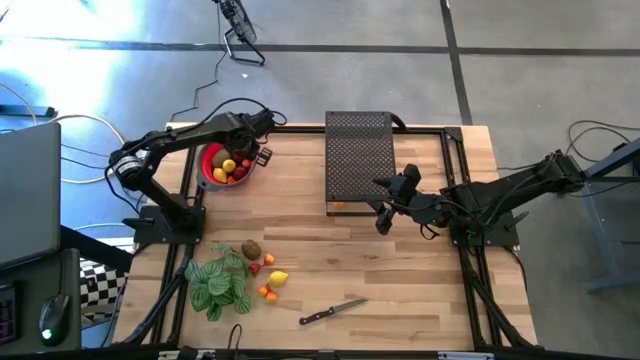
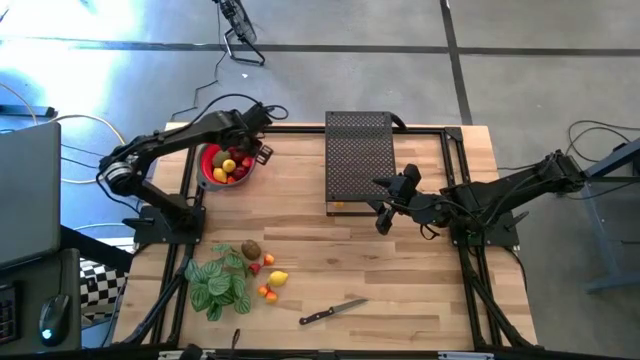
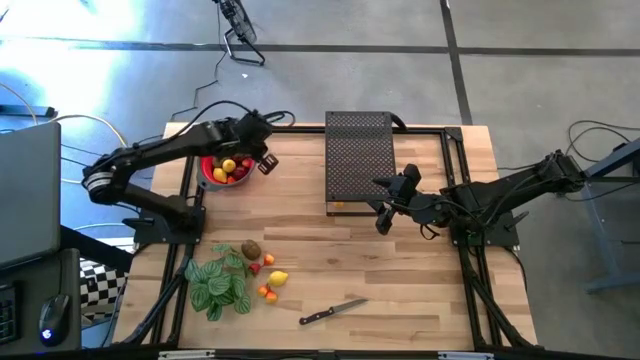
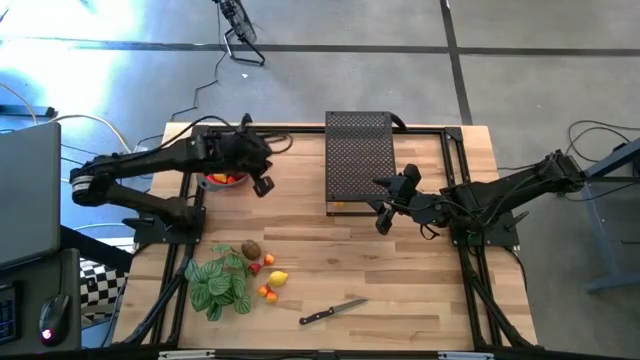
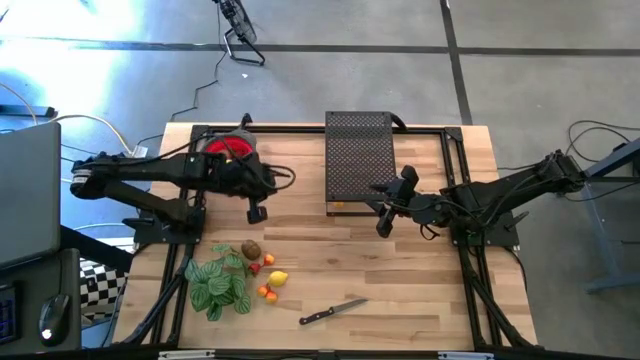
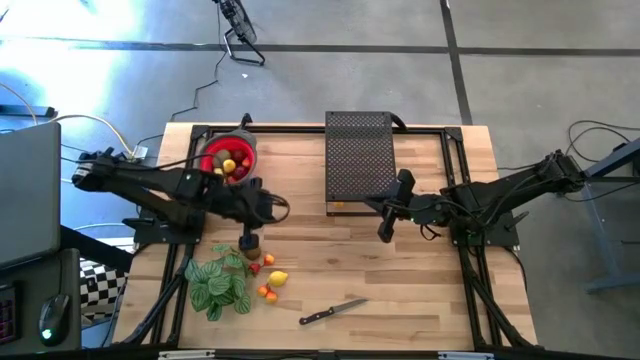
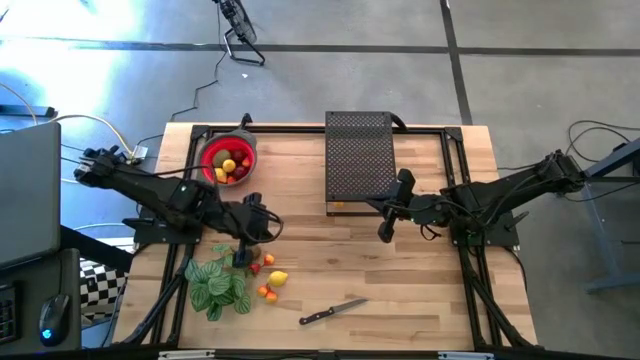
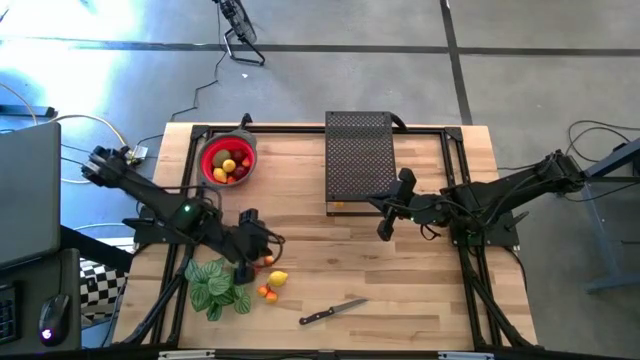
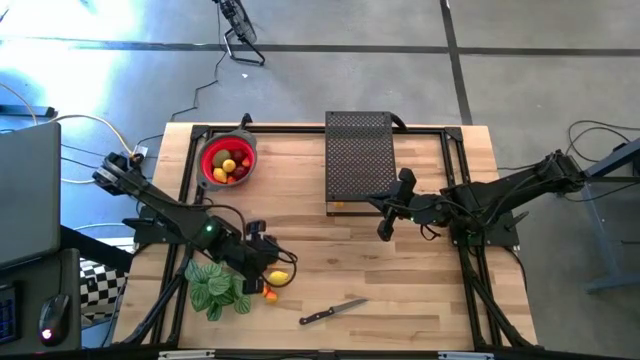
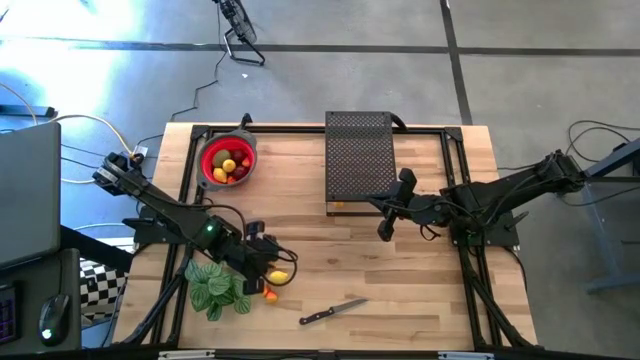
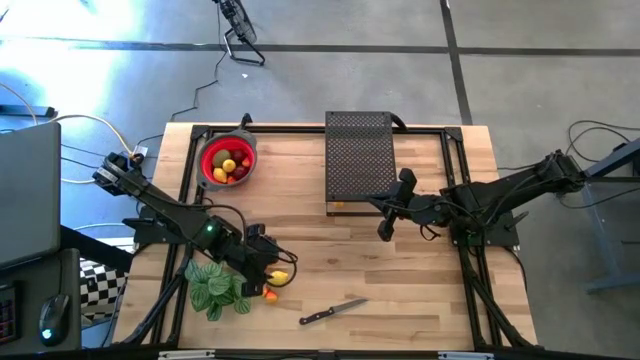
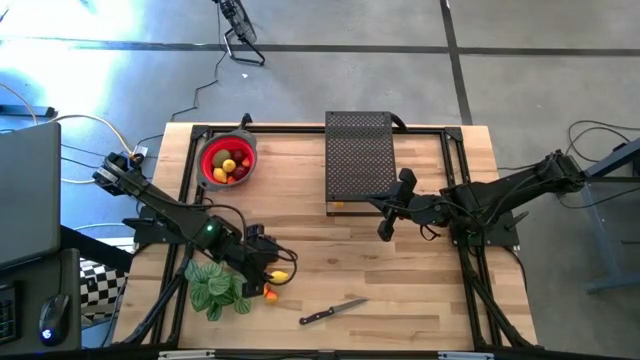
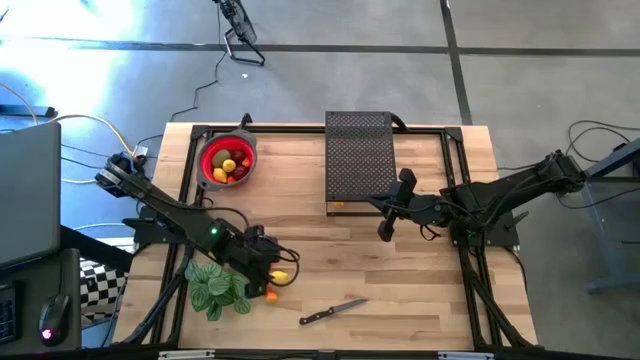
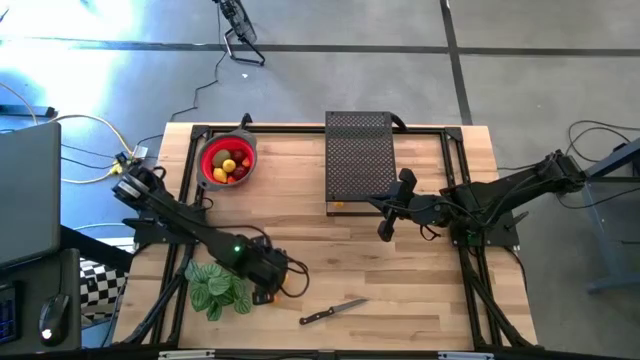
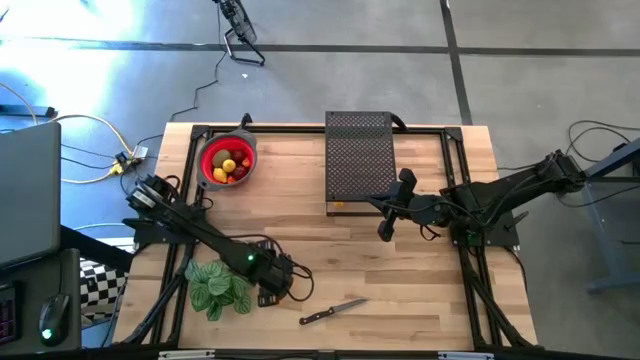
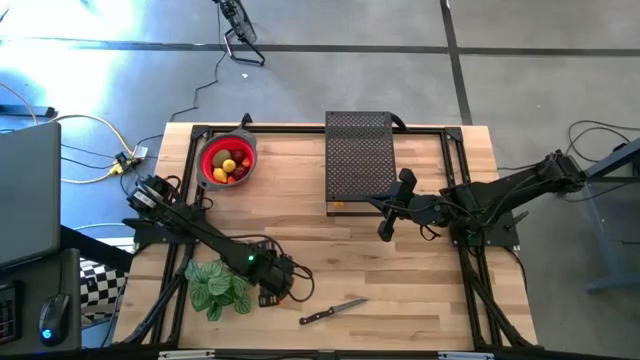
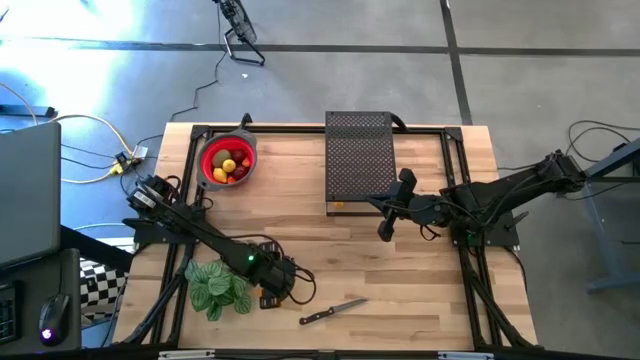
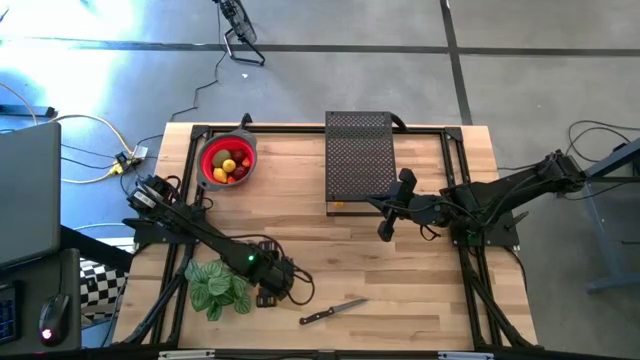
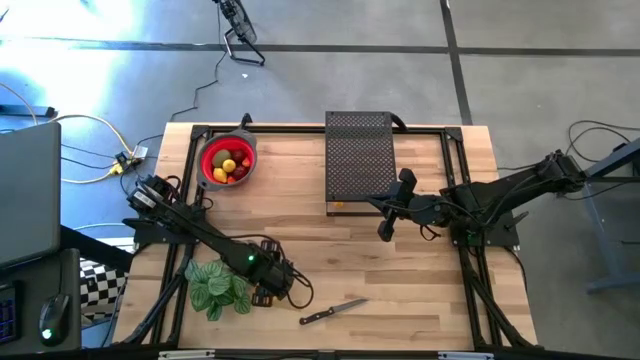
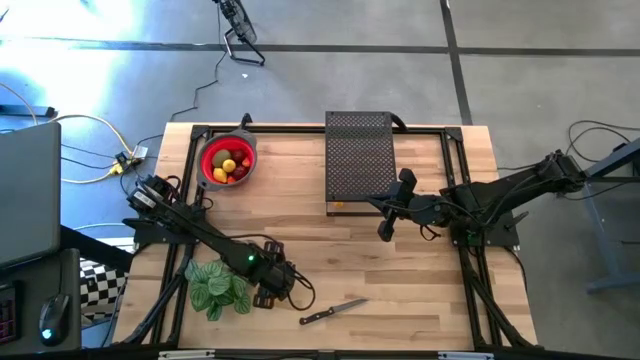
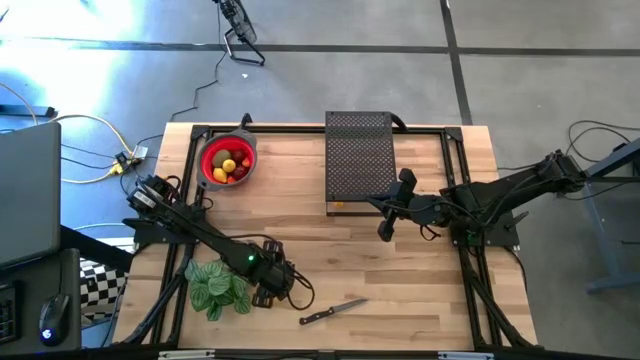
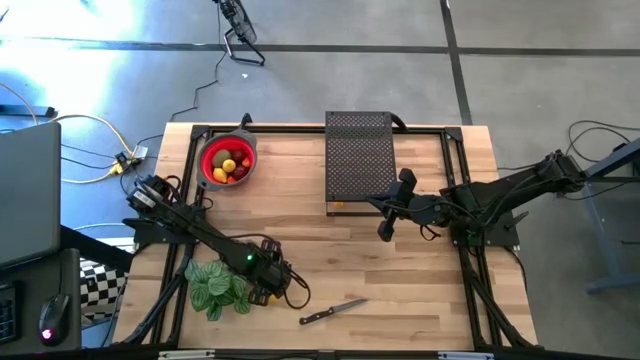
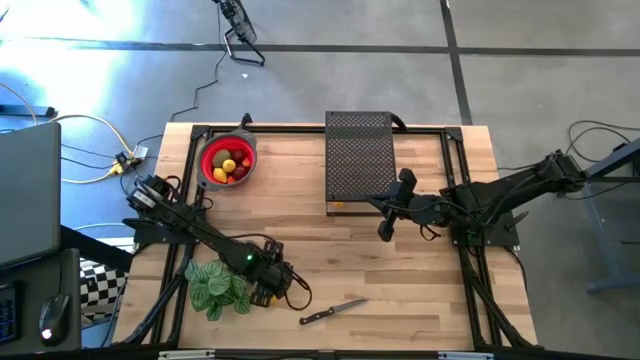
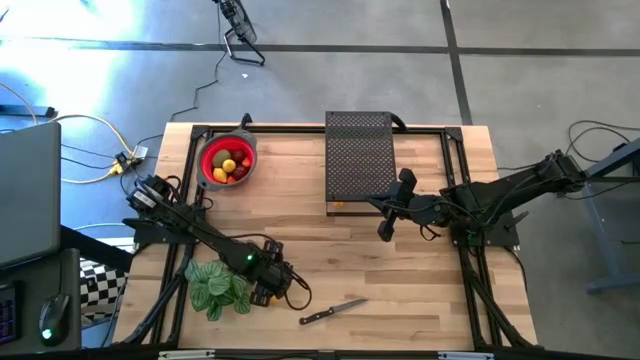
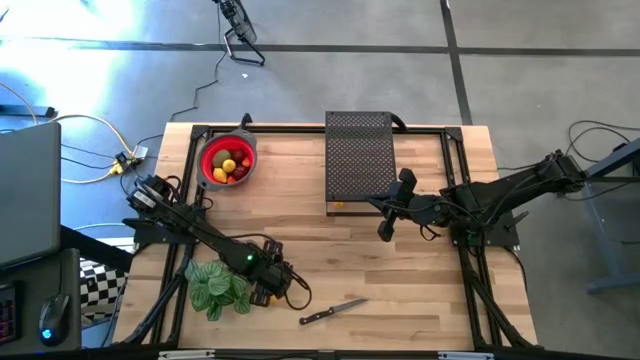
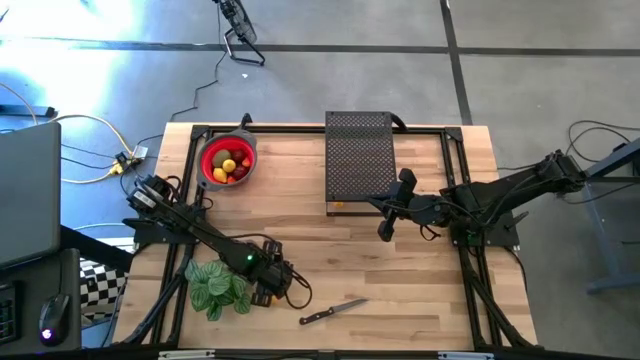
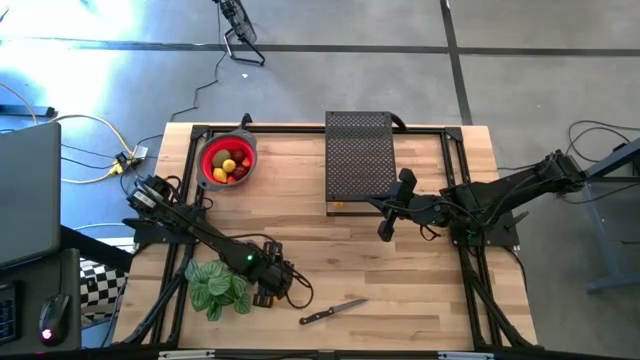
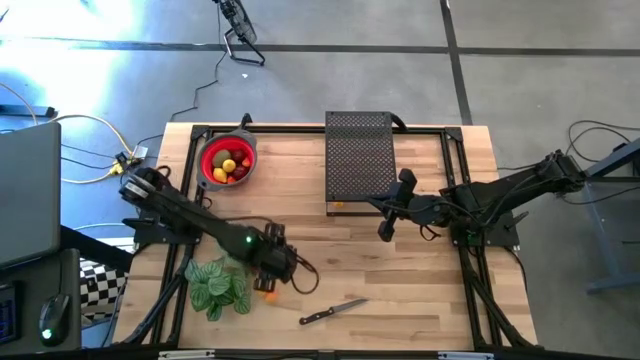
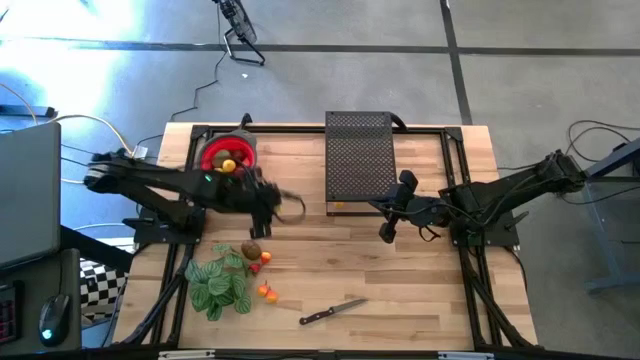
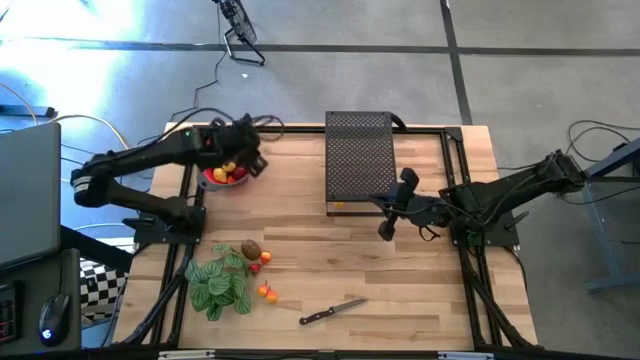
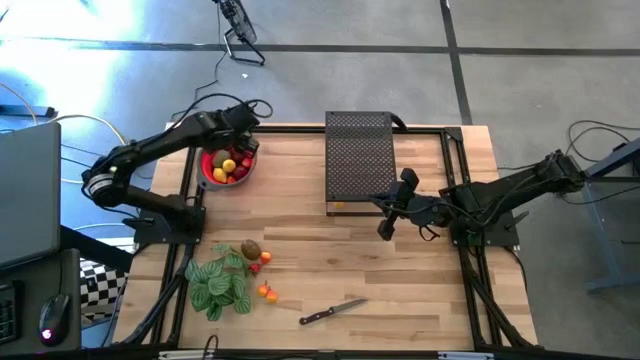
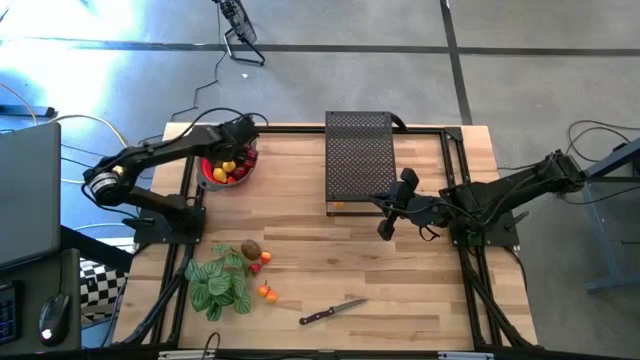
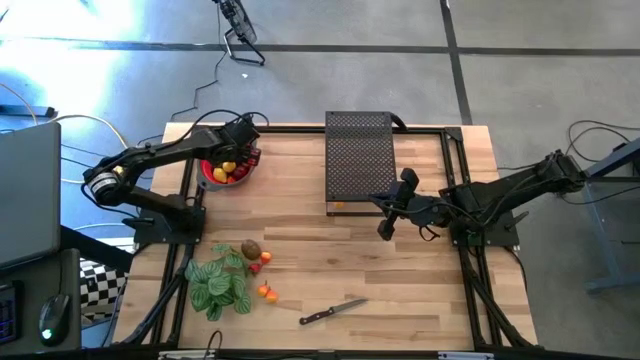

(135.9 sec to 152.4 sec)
Task: Pick & Place Fruit
Put the yellow lemon into the strainer bowl

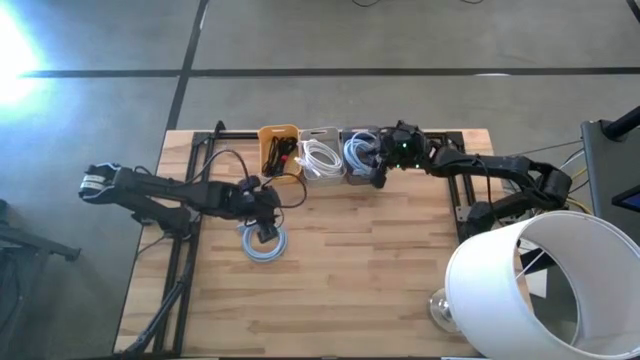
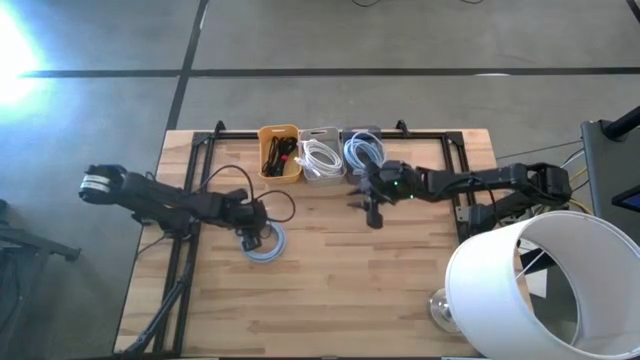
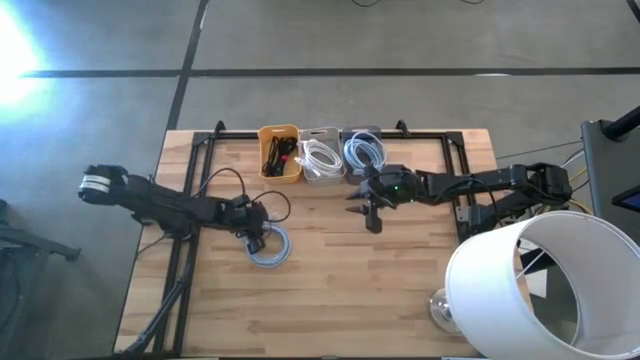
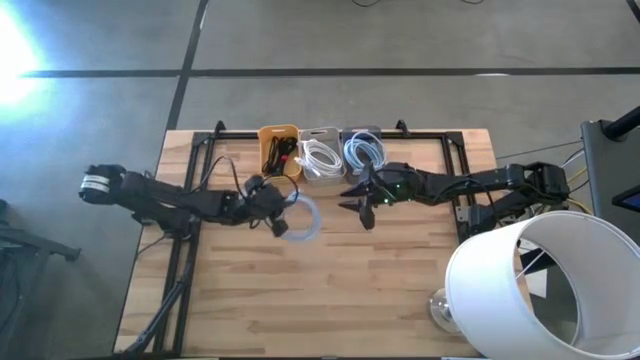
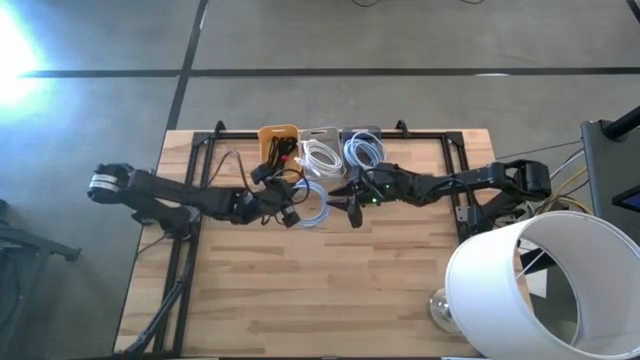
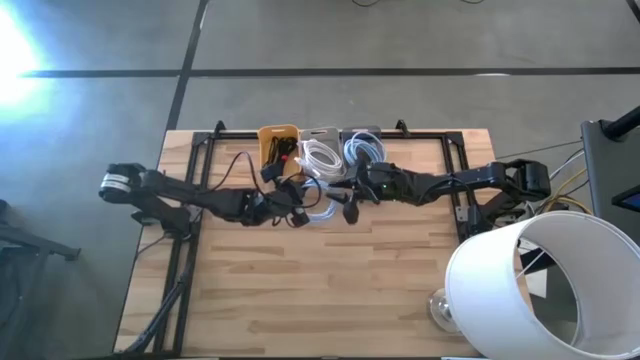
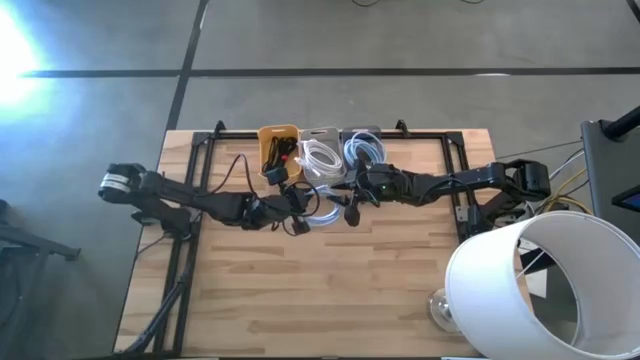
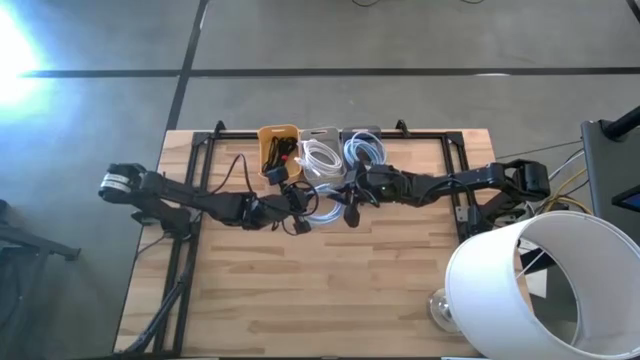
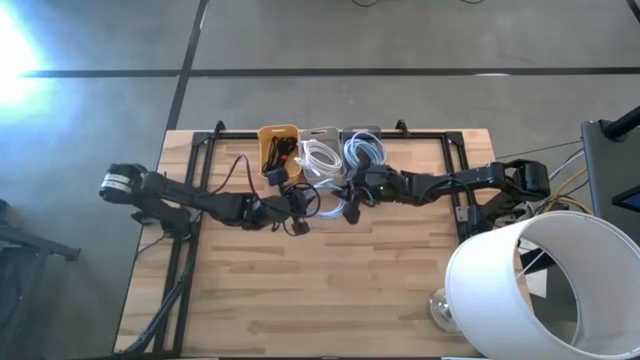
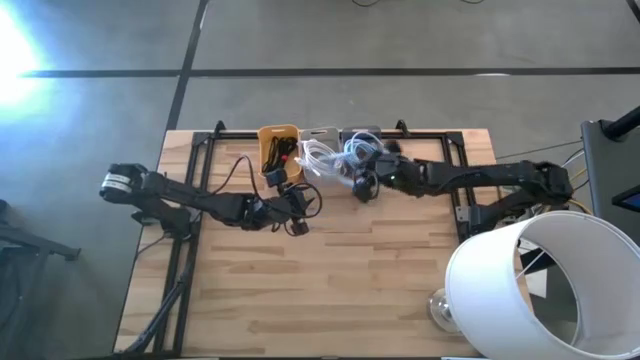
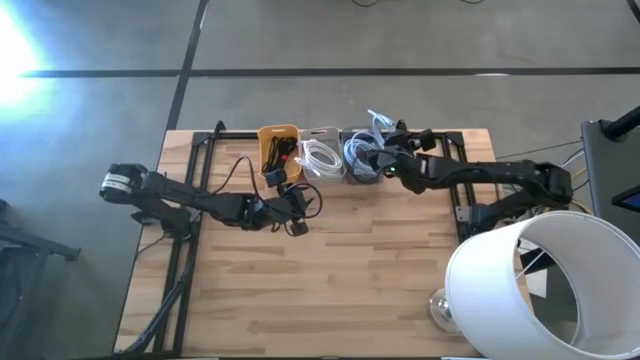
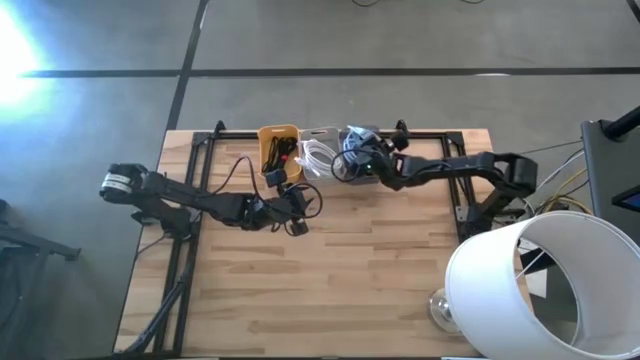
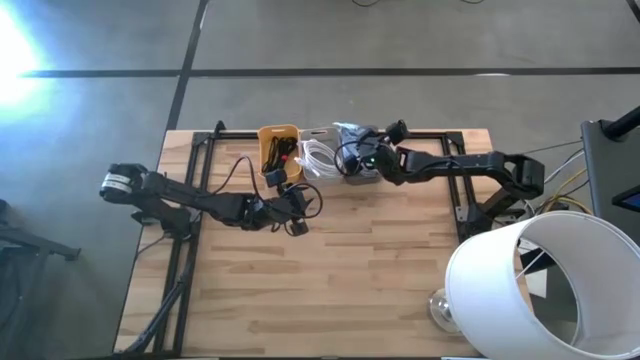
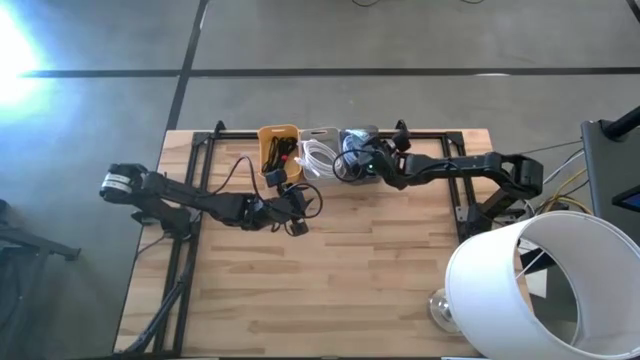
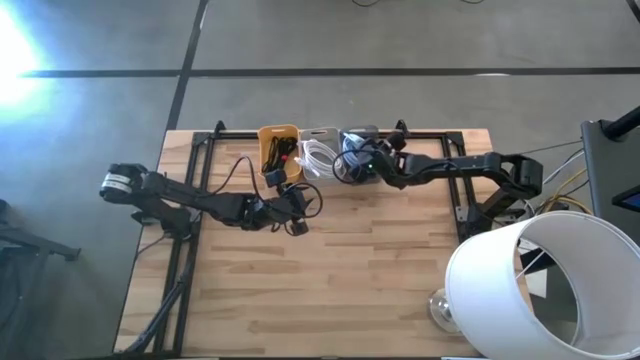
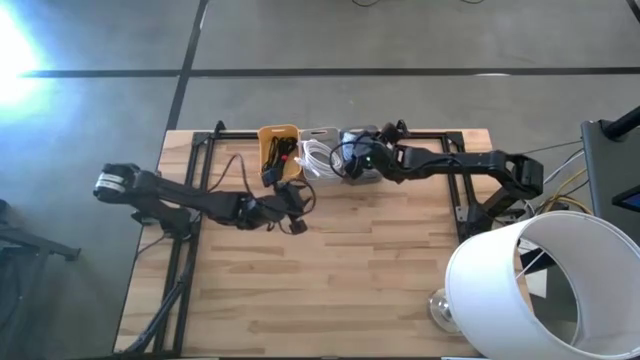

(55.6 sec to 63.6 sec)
Task: Pick & Place USB Port
Put the blue display cable into the black bin
